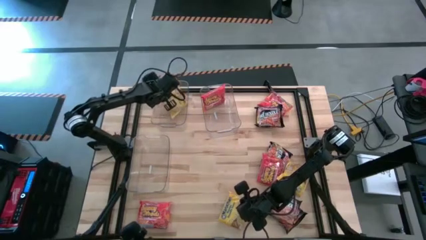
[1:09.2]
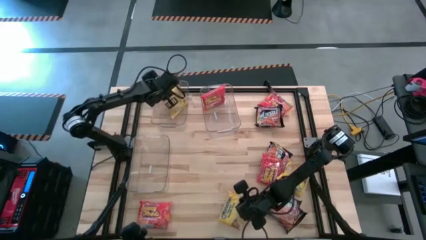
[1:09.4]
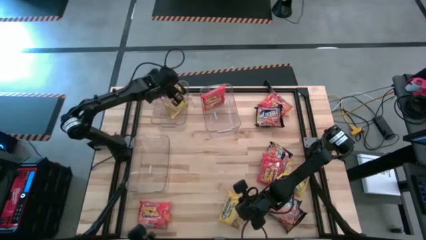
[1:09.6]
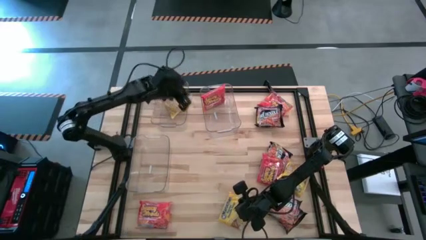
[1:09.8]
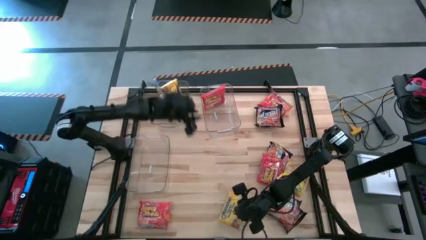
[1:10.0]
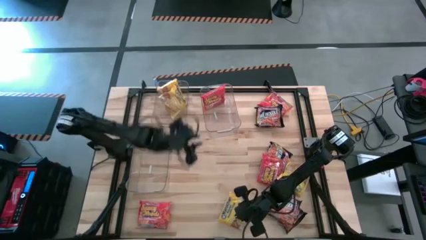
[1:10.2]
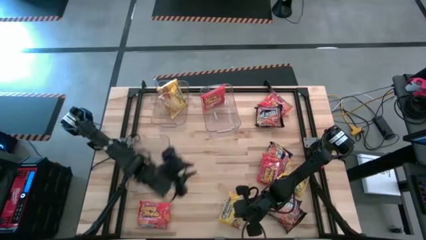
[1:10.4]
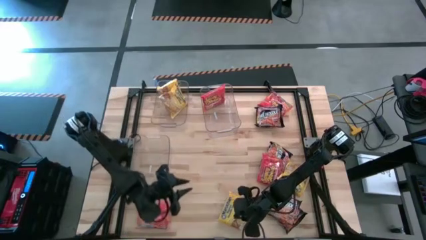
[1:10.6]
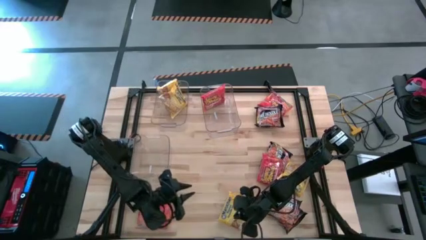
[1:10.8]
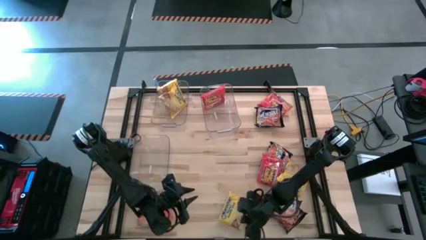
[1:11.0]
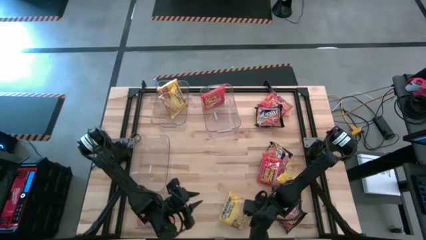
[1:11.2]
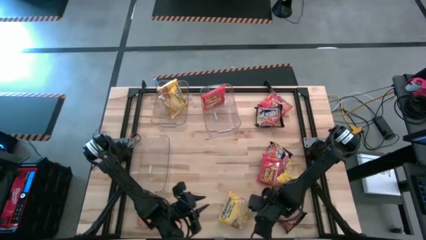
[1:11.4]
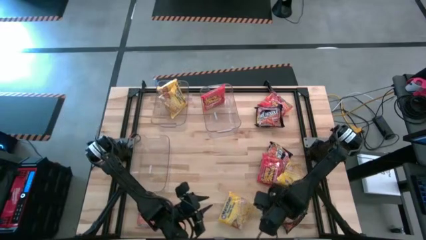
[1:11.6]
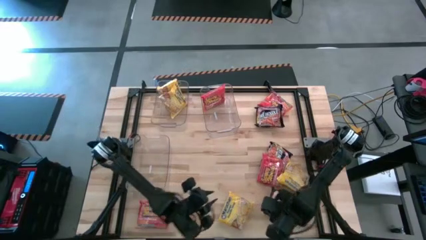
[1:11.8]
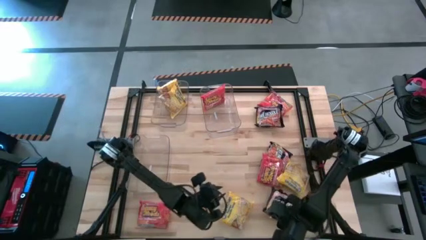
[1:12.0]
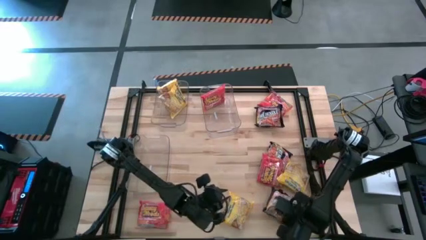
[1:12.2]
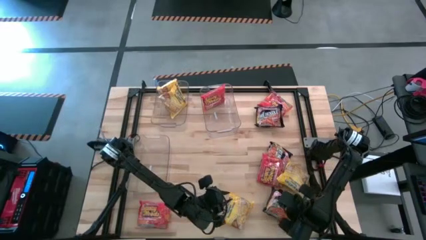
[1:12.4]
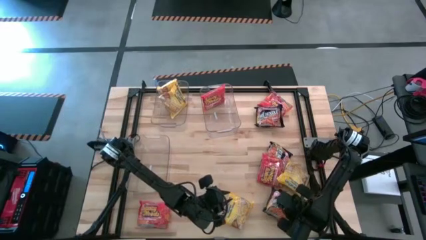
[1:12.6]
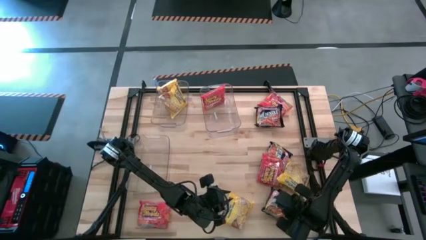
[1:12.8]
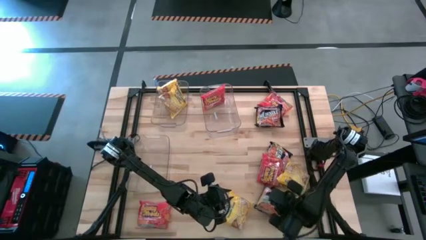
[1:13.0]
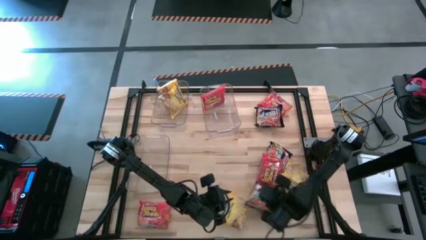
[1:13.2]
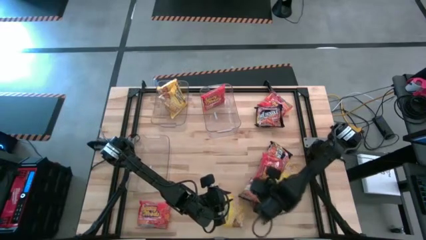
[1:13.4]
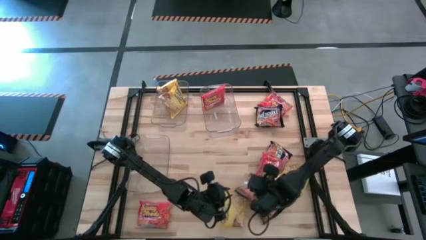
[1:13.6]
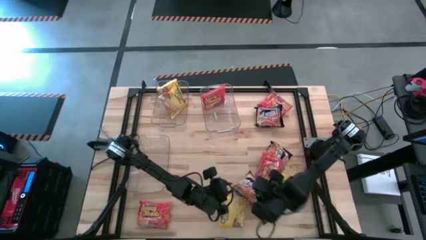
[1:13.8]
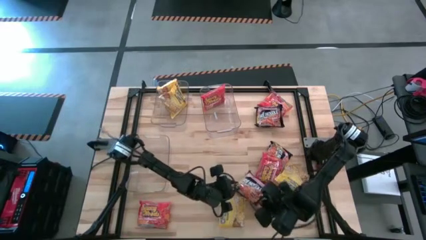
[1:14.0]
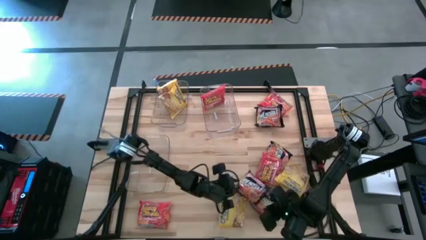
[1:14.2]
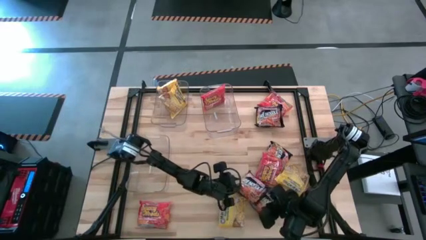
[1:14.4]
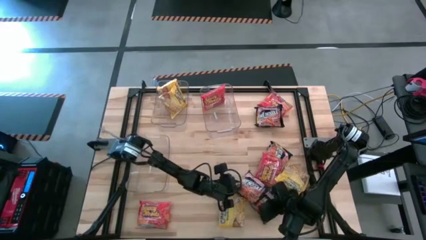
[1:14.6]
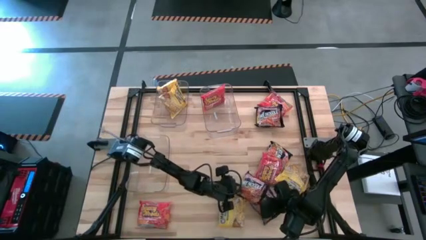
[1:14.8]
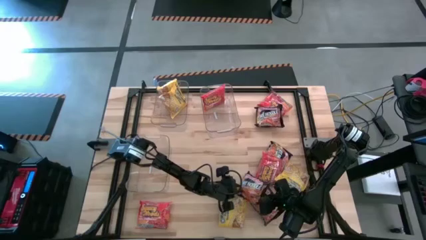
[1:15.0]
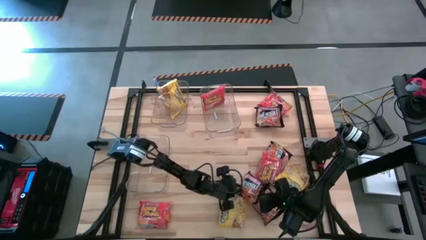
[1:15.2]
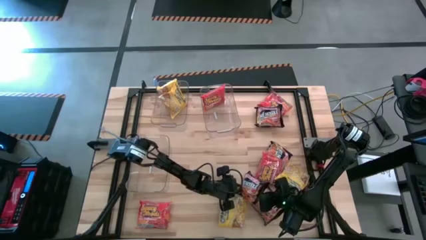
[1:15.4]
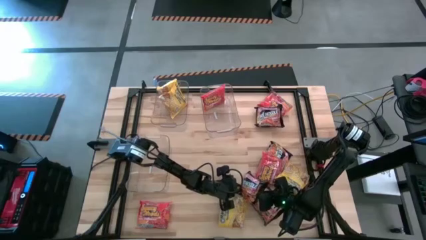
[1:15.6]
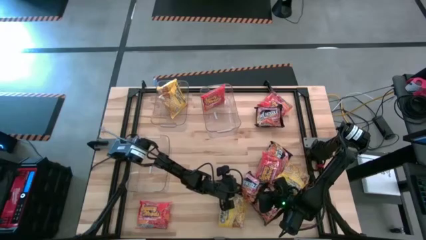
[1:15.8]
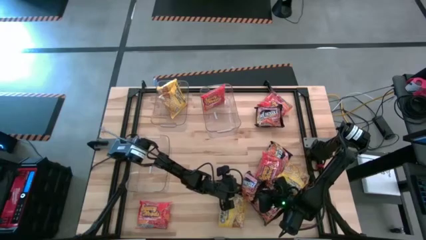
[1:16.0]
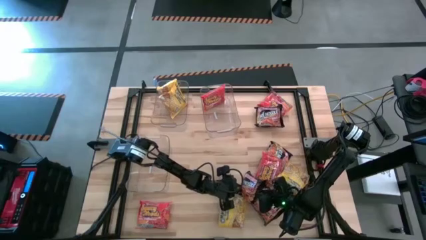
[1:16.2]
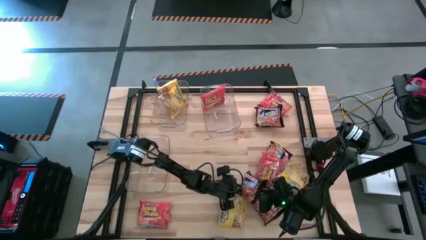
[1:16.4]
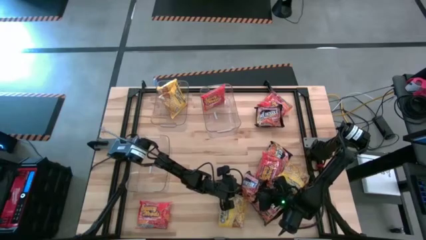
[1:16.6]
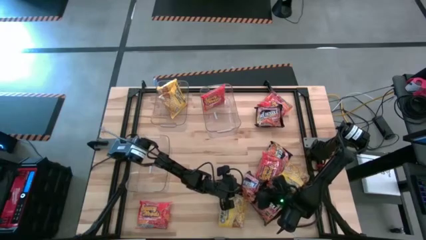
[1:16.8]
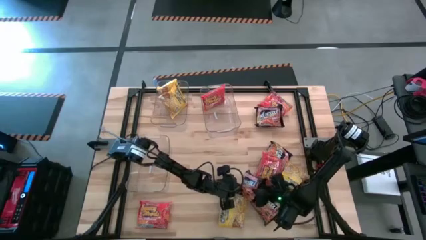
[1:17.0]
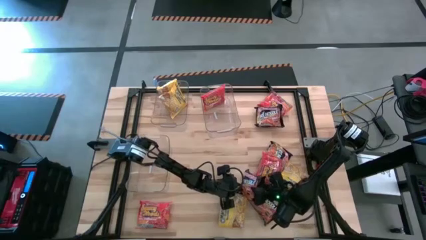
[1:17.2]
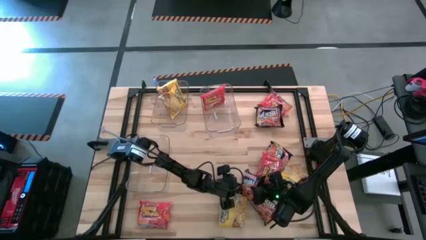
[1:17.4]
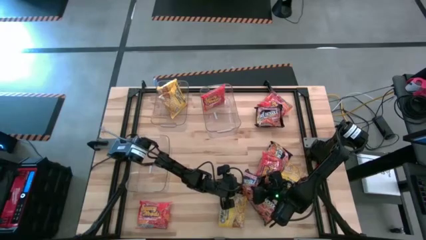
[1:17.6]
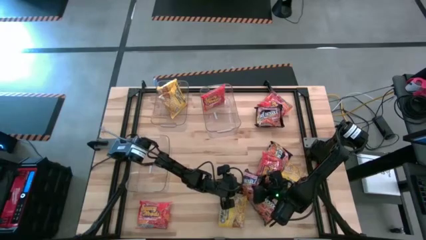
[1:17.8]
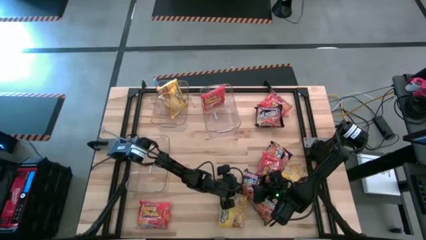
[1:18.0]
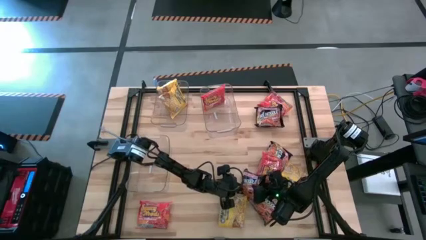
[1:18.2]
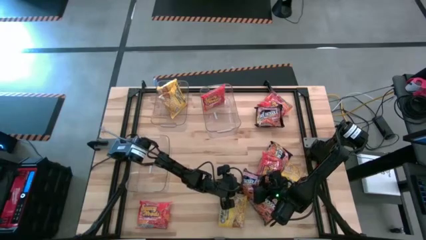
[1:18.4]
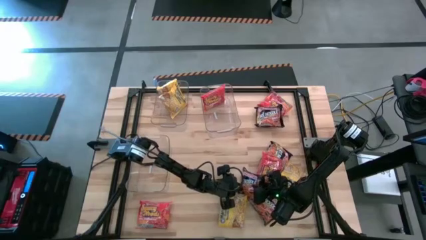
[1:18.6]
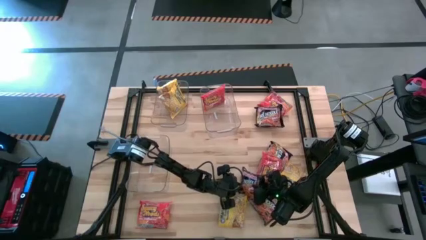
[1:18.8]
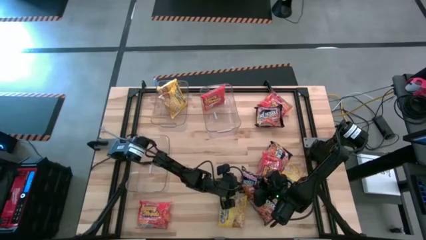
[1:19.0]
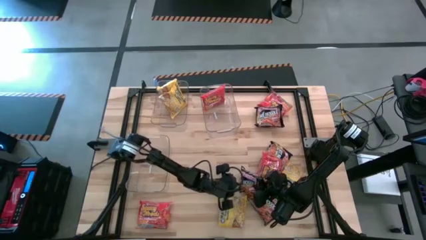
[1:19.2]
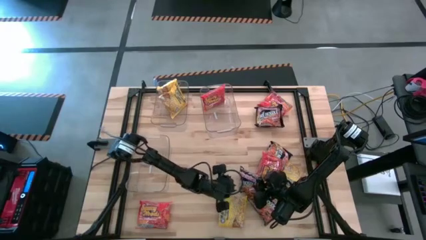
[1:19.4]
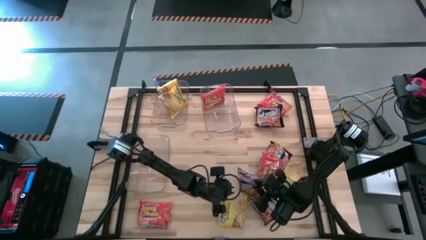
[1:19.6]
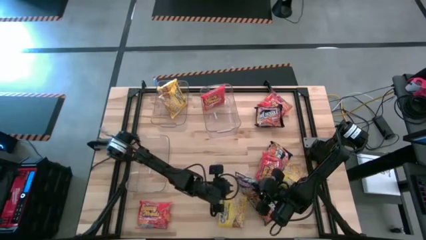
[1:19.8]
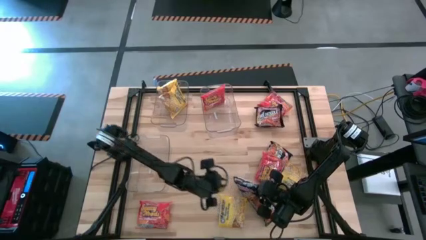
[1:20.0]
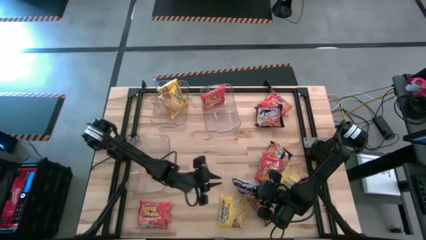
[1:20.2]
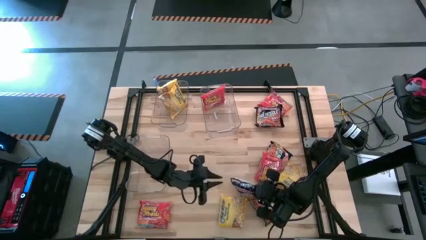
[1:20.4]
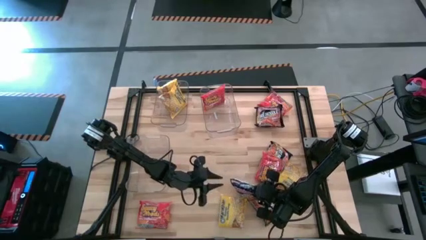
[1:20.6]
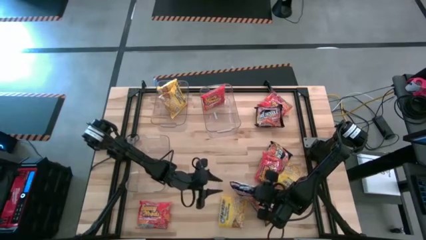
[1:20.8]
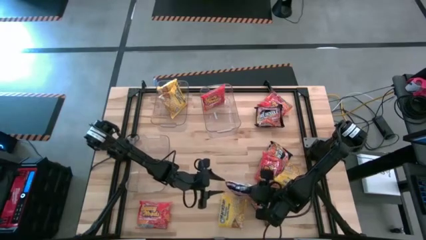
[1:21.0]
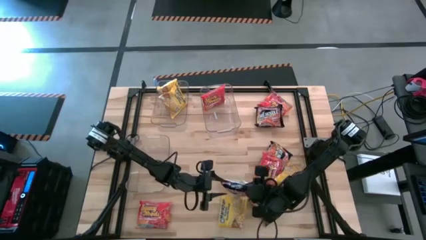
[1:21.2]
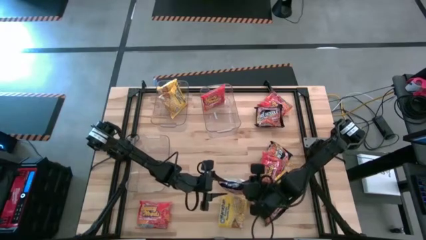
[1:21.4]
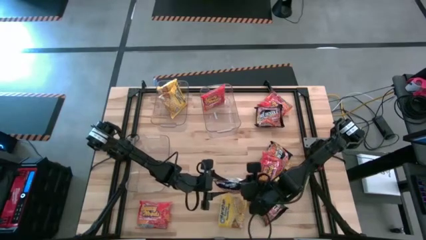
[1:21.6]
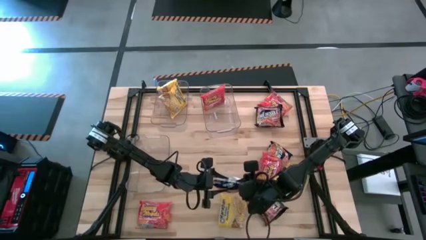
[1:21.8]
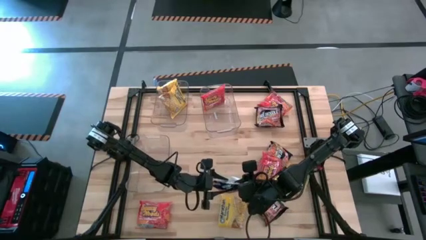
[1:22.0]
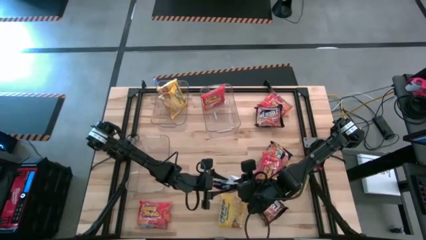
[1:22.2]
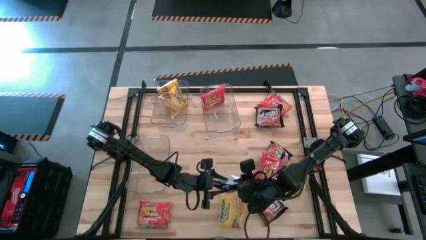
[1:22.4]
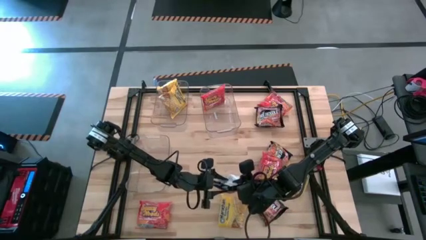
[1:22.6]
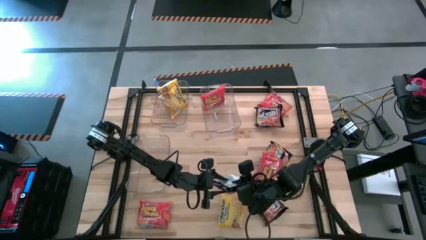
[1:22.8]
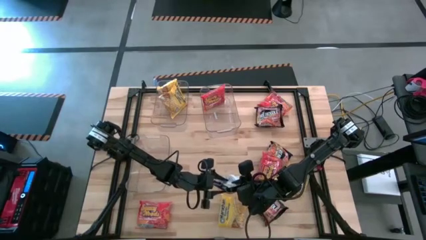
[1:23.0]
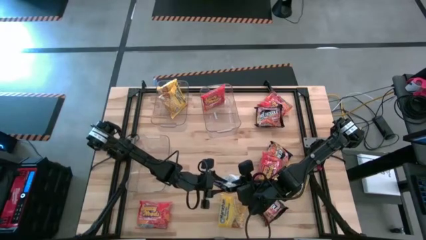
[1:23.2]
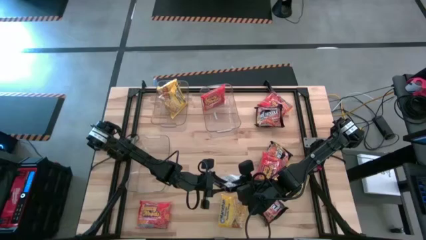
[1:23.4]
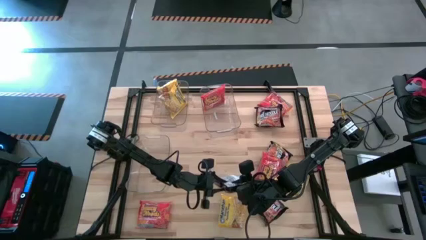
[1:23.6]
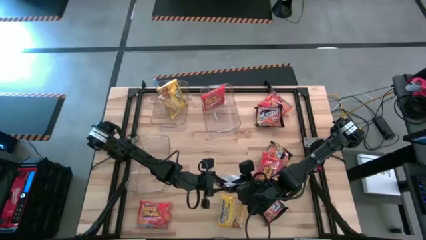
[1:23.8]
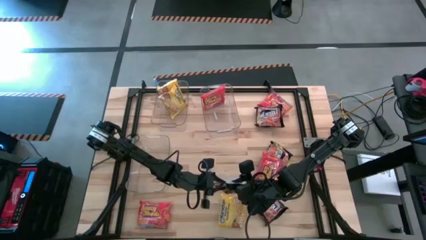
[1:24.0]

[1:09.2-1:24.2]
Task: Sort Maruchan noodles
Put the black noodle pack into the bottom transparent bin
